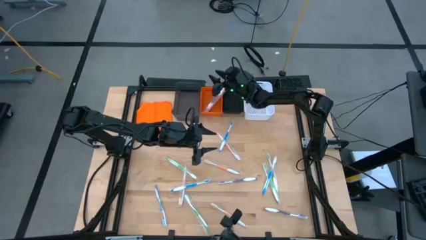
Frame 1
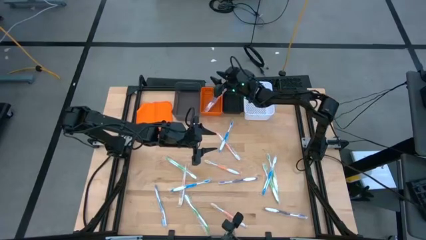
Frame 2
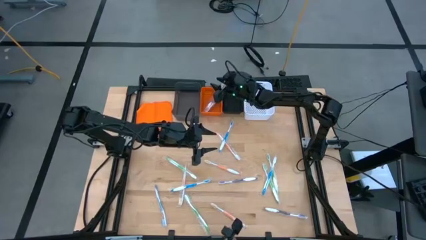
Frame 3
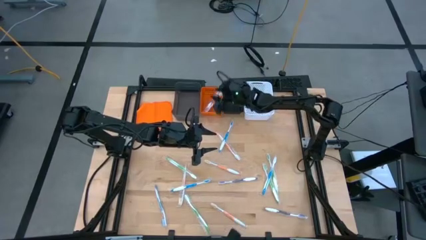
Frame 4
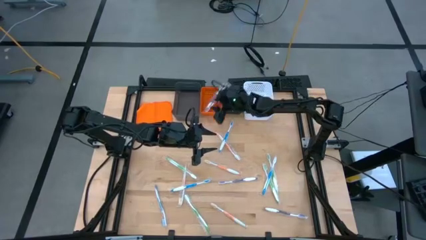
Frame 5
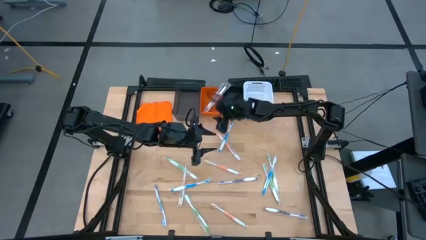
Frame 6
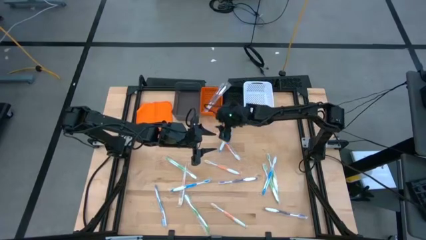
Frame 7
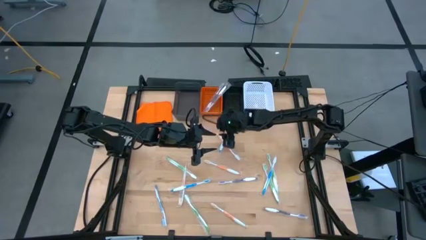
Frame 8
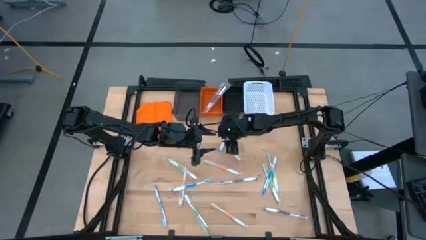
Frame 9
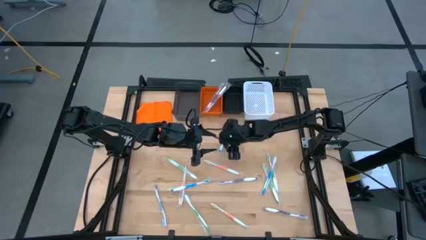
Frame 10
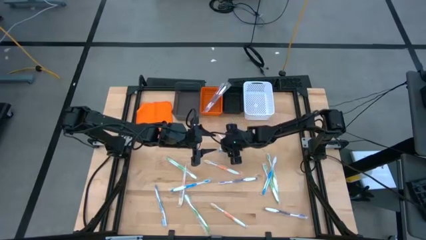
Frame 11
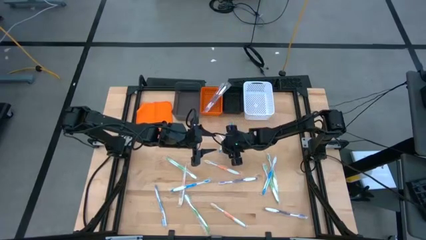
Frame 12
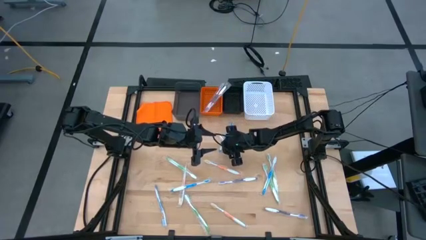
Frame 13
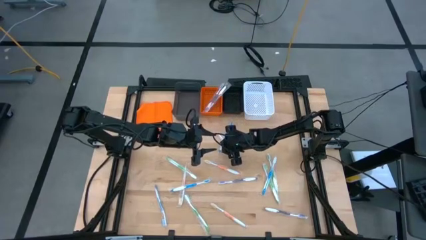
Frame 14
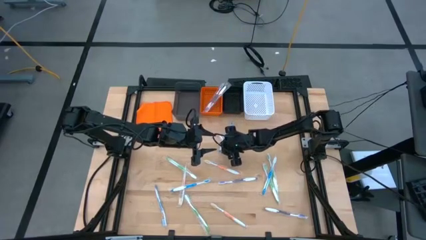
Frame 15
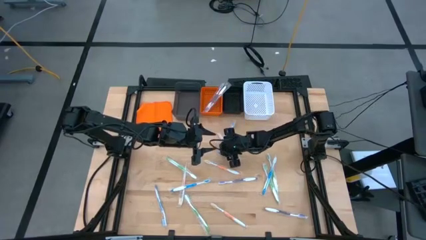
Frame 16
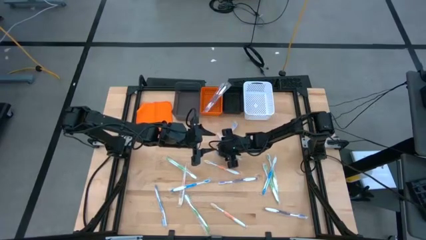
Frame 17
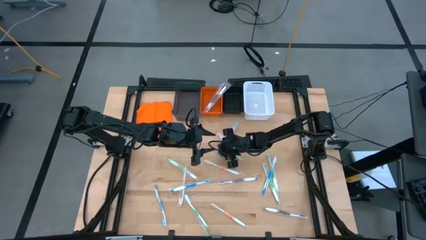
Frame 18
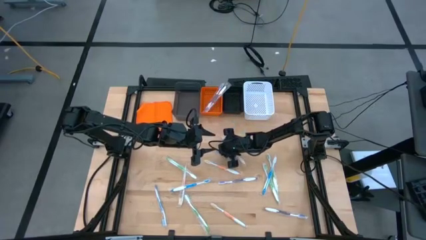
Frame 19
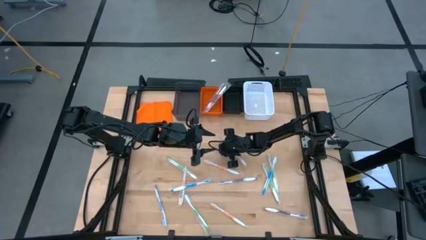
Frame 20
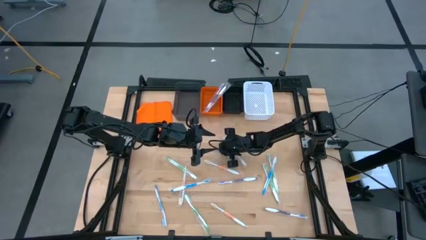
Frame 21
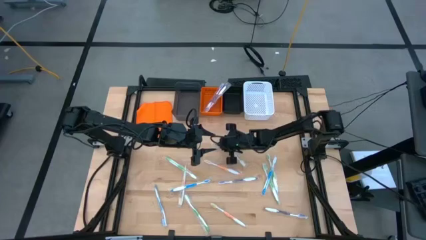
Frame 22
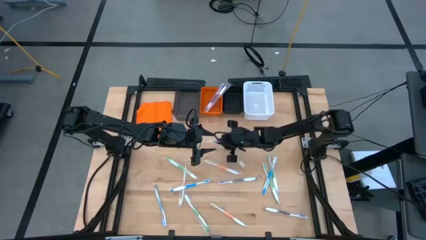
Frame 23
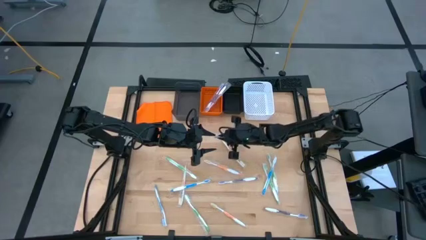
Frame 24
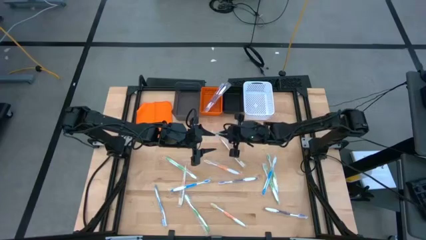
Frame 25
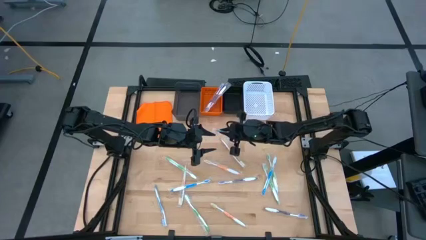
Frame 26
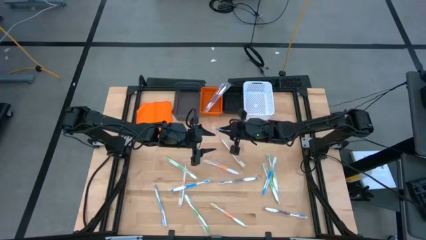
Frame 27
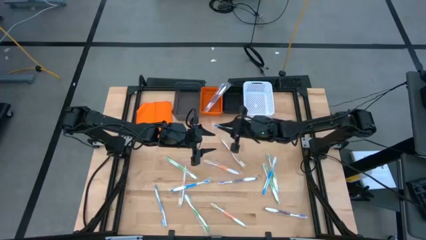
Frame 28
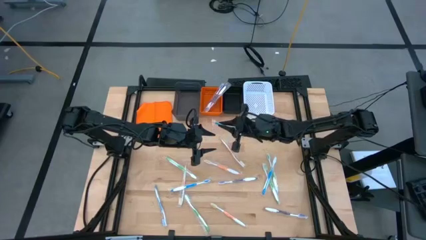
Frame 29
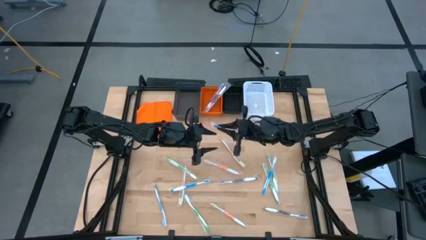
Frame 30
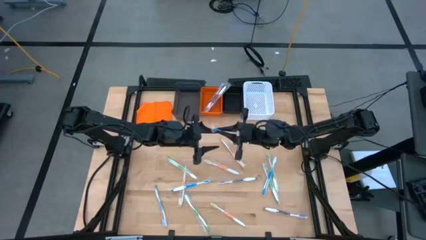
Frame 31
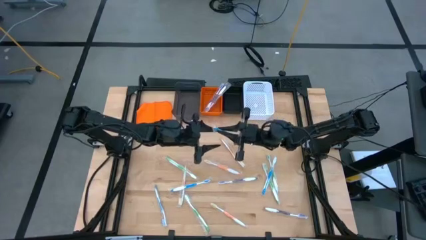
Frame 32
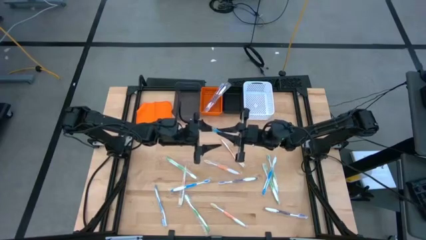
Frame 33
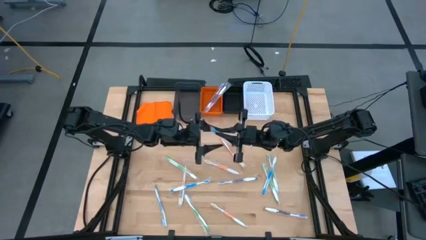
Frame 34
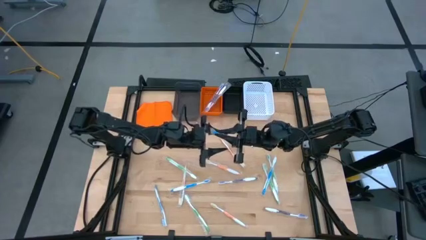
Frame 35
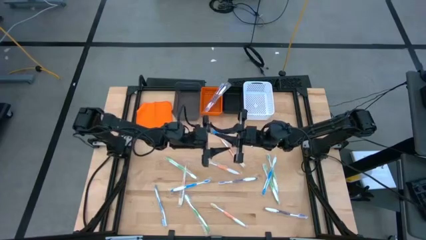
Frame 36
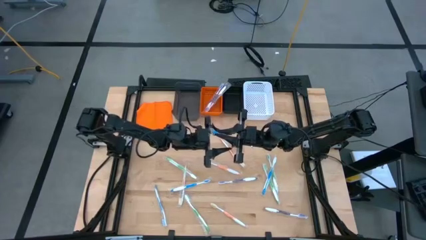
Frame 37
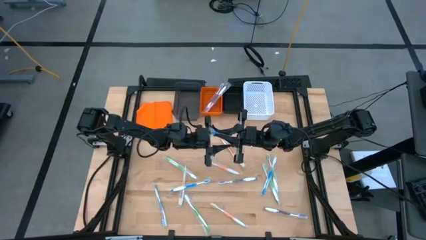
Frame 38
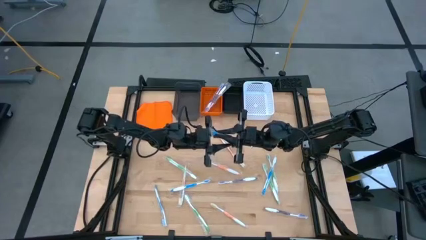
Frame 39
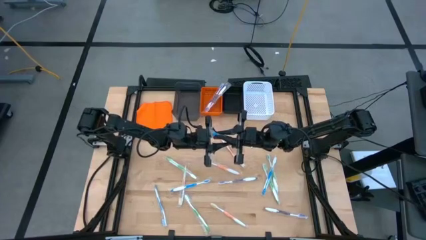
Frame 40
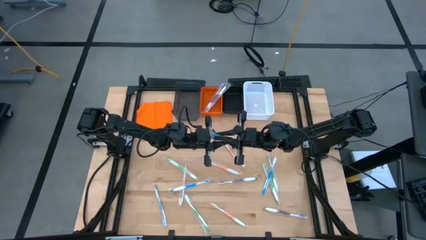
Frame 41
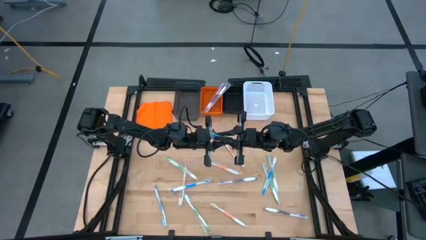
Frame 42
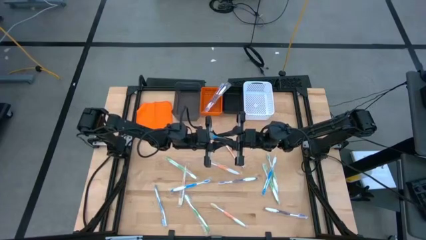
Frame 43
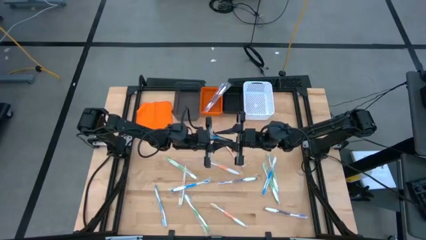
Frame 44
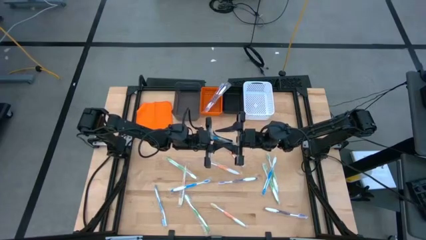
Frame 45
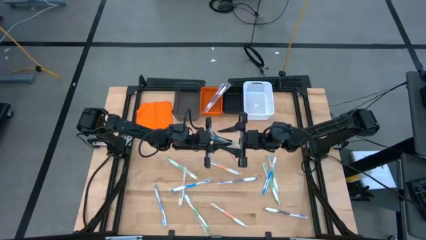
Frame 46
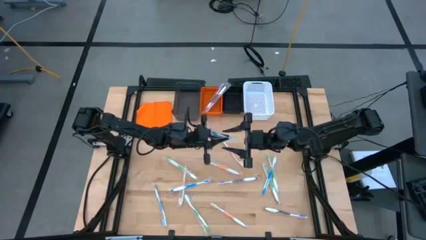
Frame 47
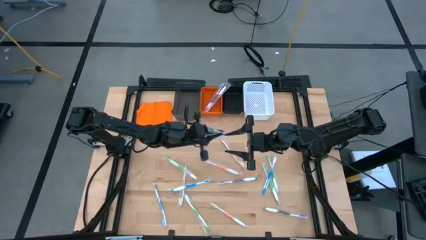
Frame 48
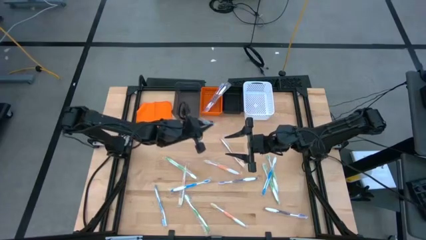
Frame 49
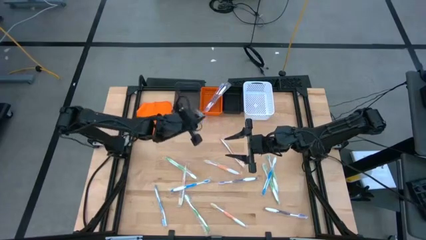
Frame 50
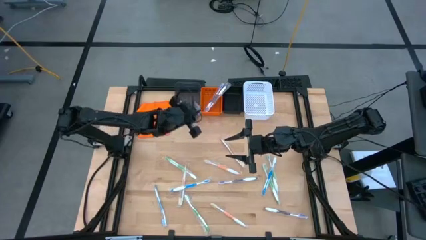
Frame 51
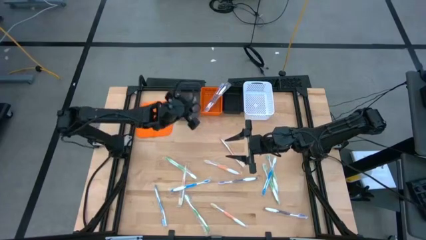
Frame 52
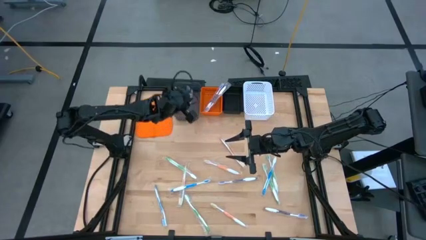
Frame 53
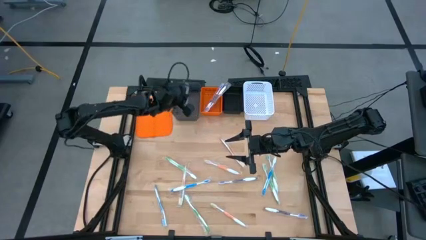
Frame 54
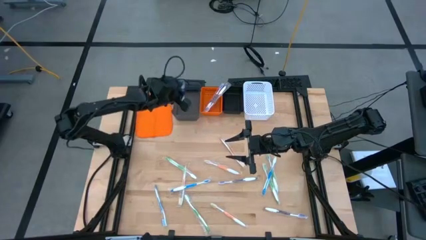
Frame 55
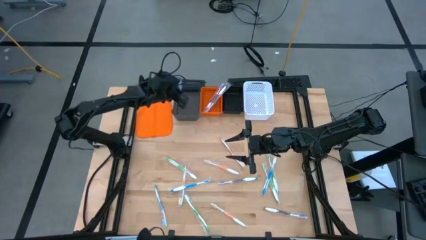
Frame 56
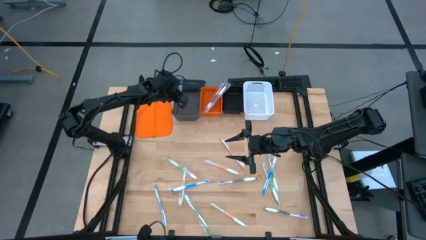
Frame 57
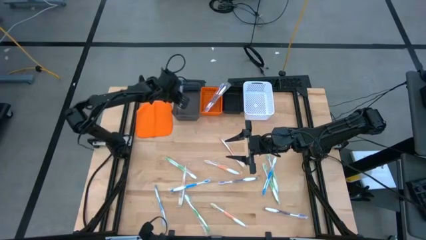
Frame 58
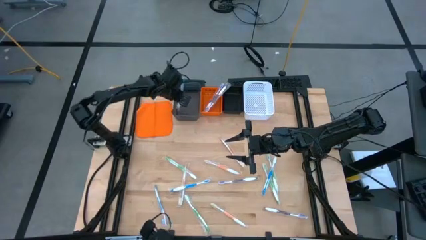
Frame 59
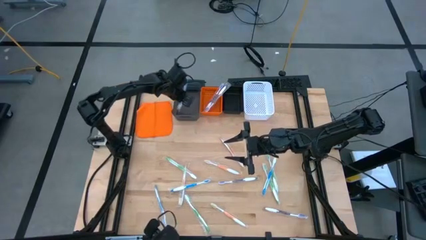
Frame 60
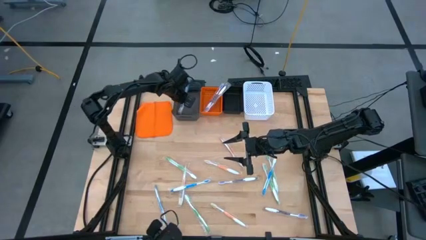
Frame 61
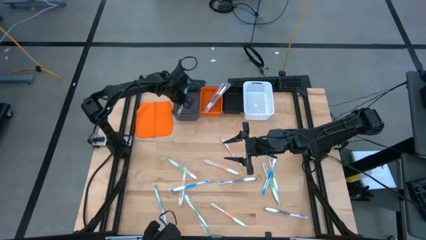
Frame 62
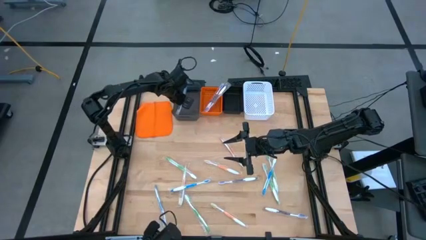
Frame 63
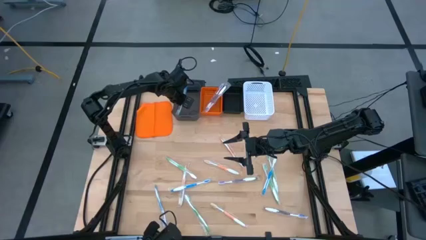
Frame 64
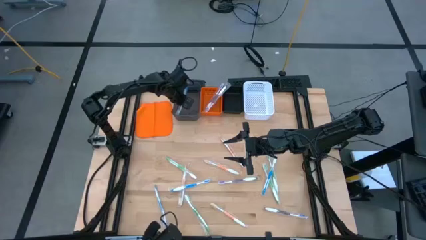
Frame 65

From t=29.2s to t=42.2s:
Task: Pick & Place Toothbrushes
Put the blue toothbrush into the gray bin

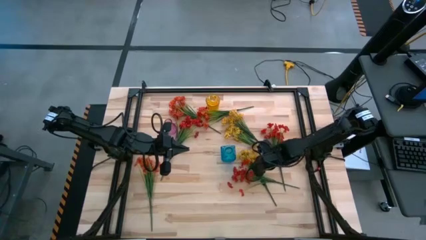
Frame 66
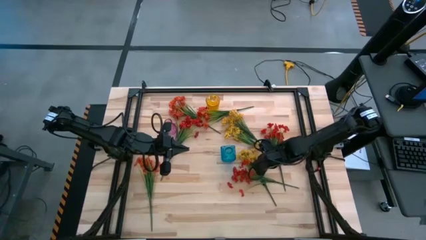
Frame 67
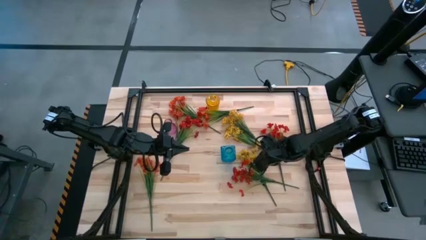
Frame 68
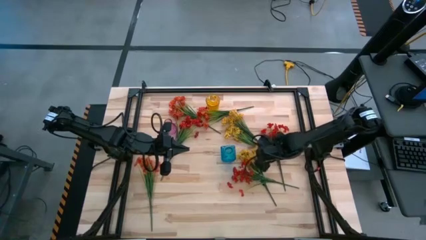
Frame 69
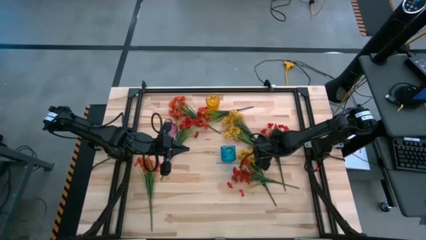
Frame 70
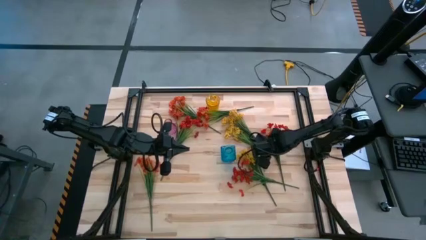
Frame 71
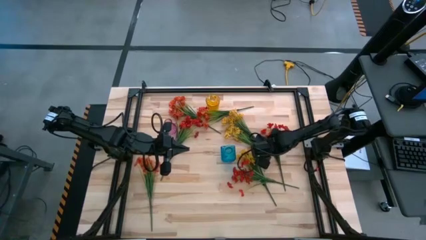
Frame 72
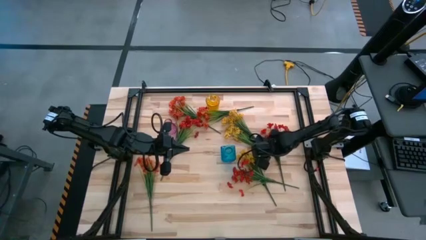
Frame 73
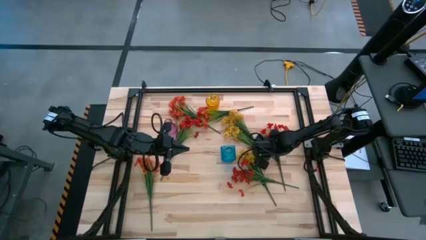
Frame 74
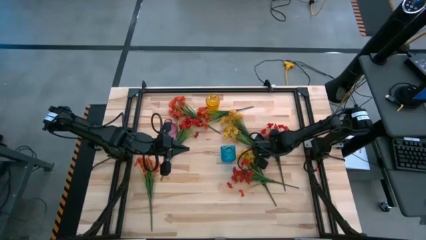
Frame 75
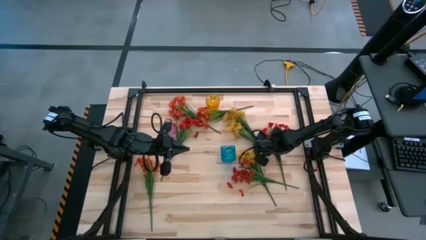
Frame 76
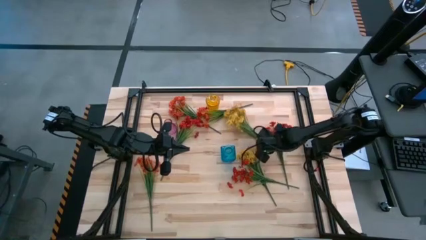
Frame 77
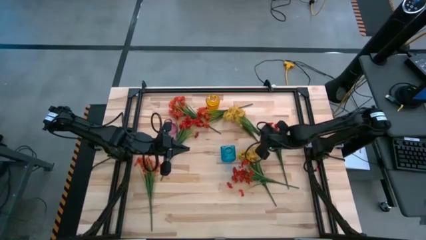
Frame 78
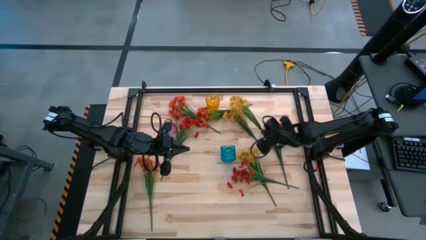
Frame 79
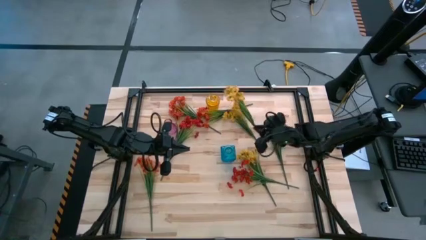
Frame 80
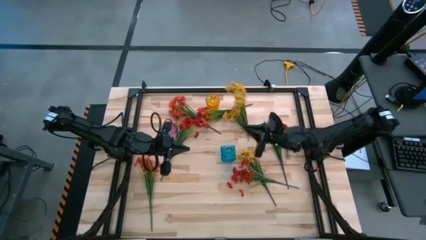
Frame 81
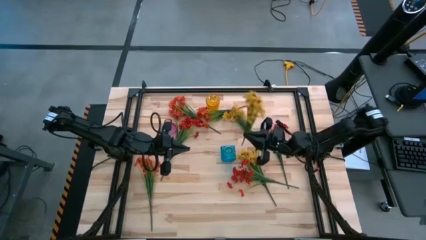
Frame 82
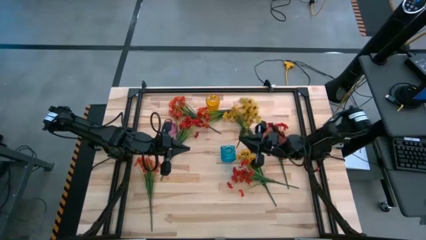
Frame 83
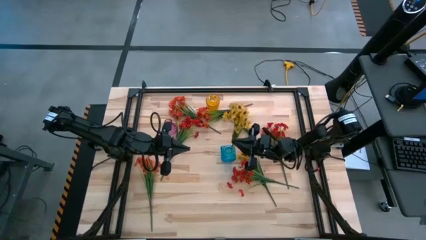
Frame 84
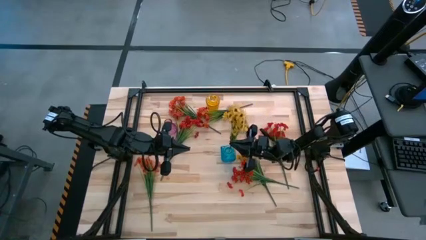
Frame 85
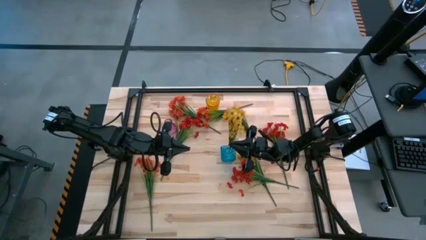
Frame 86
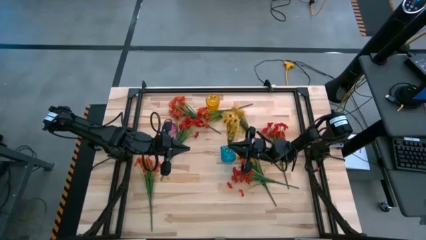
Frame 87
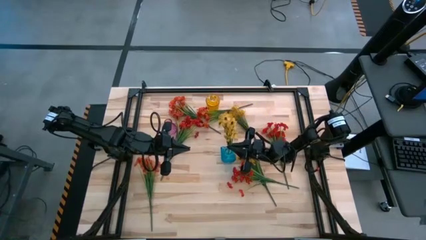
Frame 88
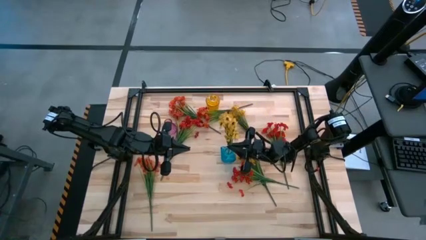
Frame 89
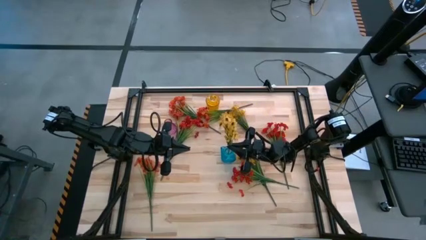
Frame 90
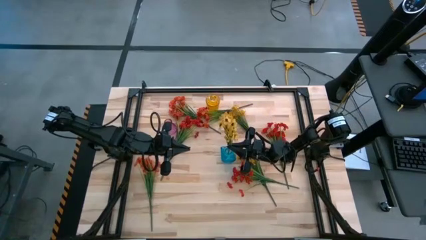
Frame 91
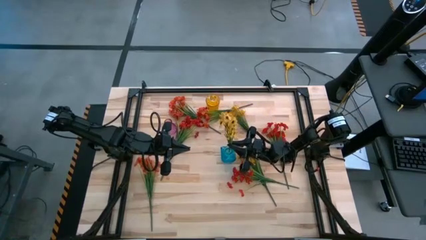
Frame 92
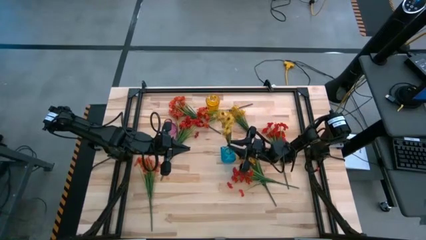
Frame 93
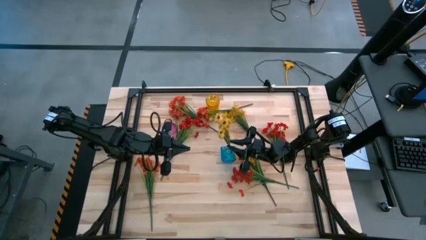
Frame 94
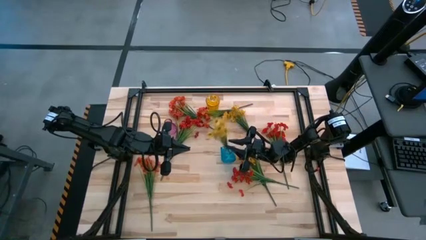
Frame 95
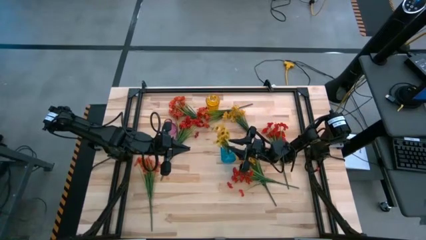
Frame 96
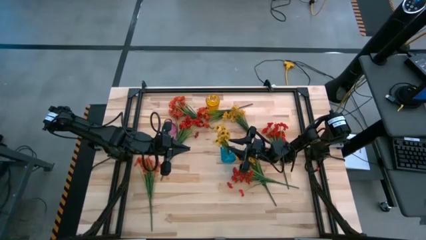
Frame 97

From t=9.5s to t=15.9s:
Task: Sort flowers into vase by color
Put the middle yellow flowers into the blue vase
